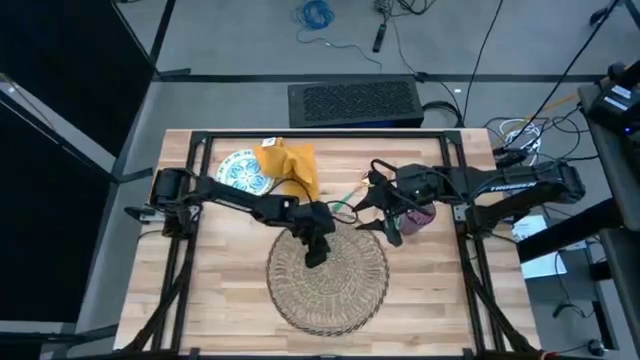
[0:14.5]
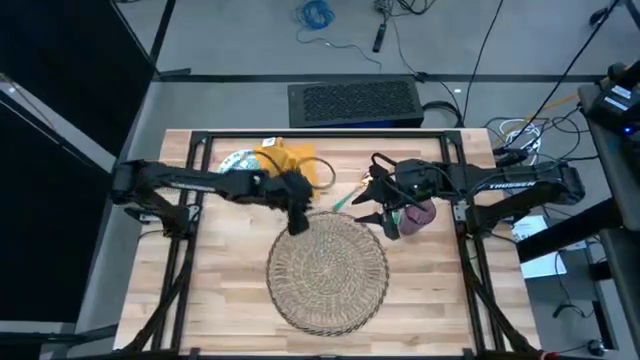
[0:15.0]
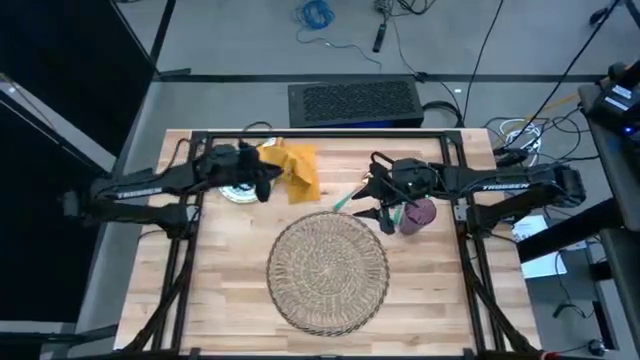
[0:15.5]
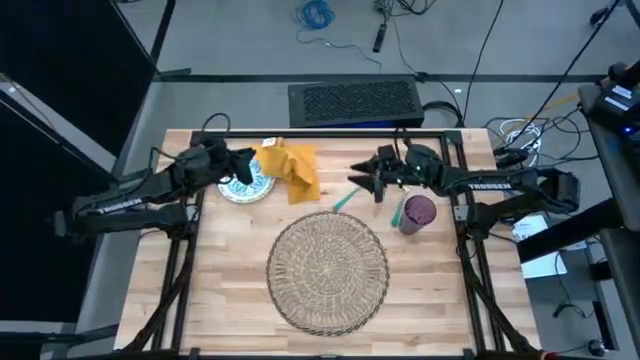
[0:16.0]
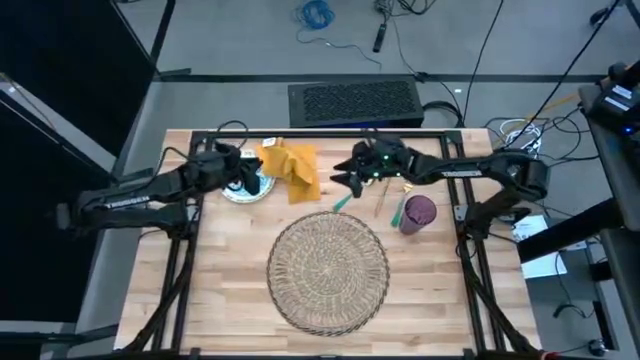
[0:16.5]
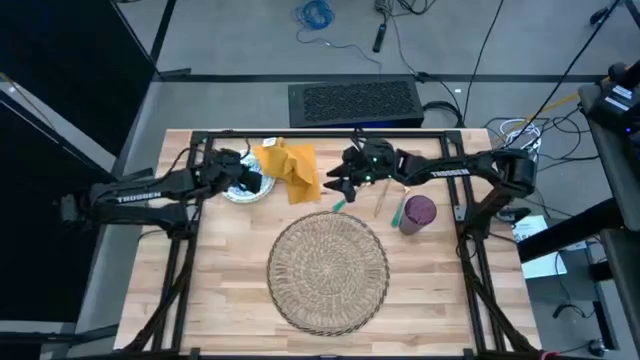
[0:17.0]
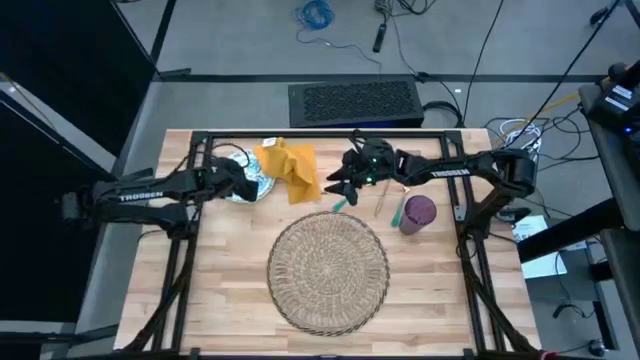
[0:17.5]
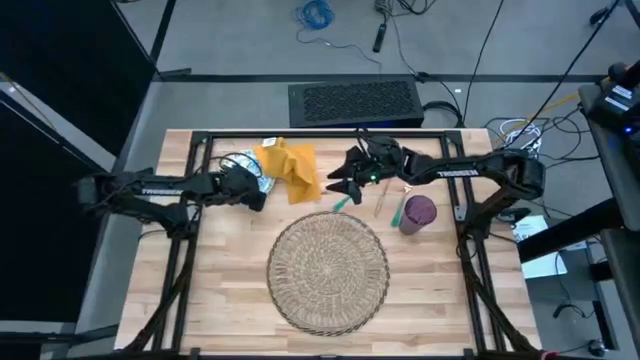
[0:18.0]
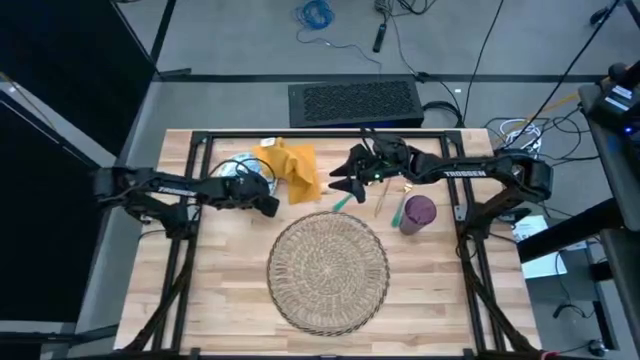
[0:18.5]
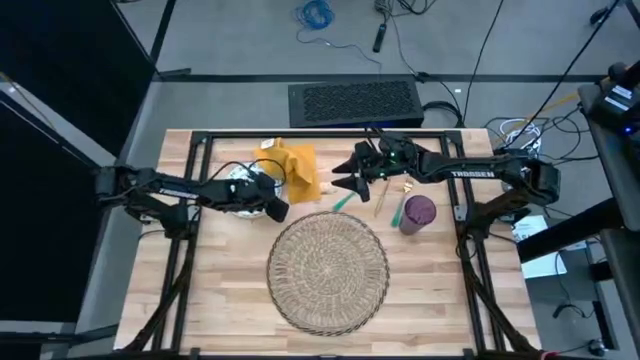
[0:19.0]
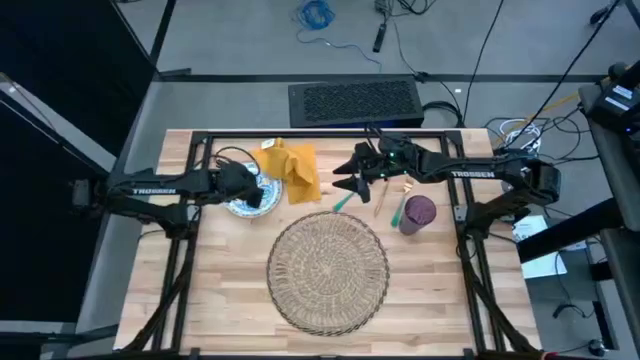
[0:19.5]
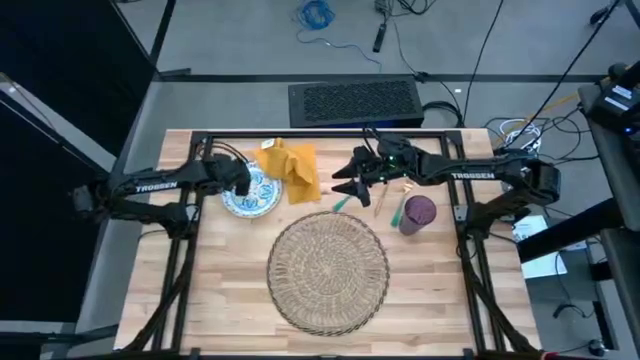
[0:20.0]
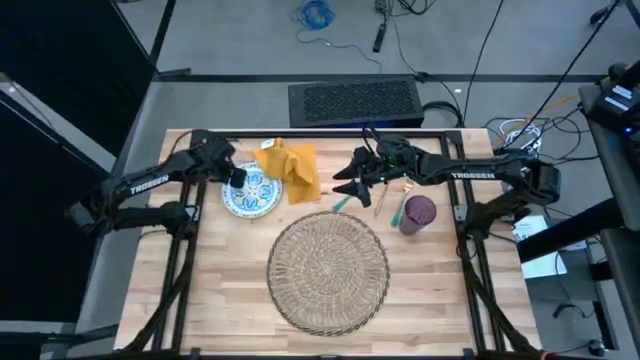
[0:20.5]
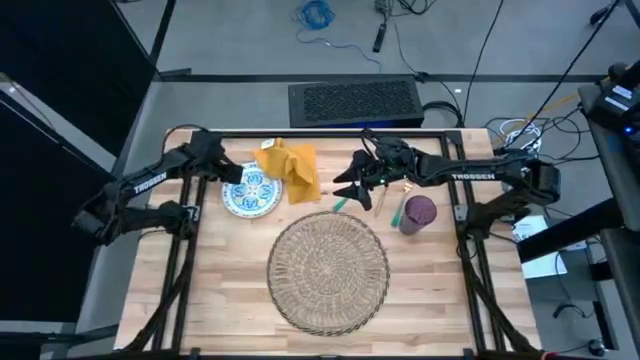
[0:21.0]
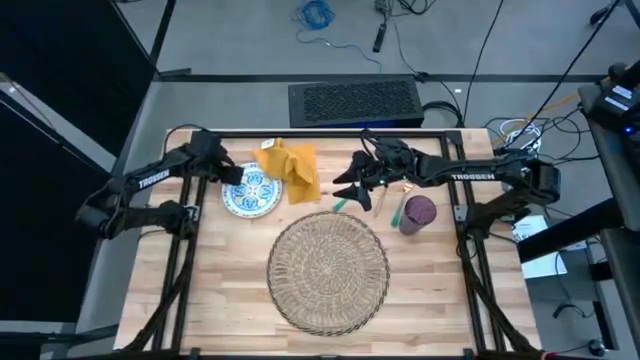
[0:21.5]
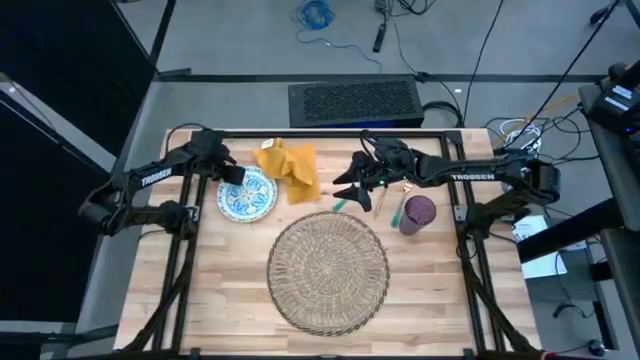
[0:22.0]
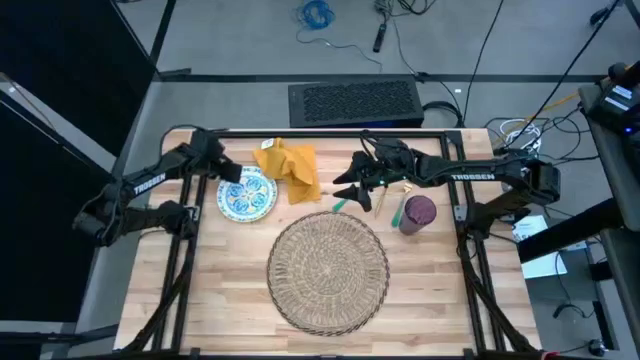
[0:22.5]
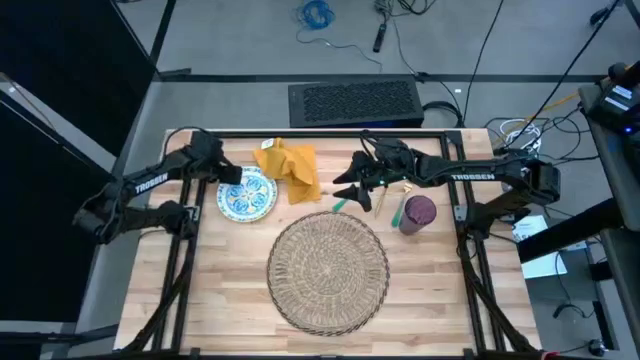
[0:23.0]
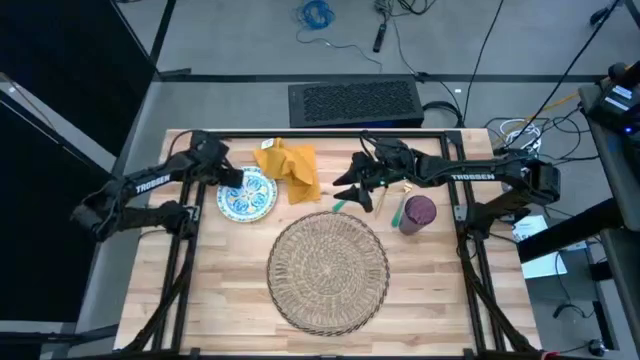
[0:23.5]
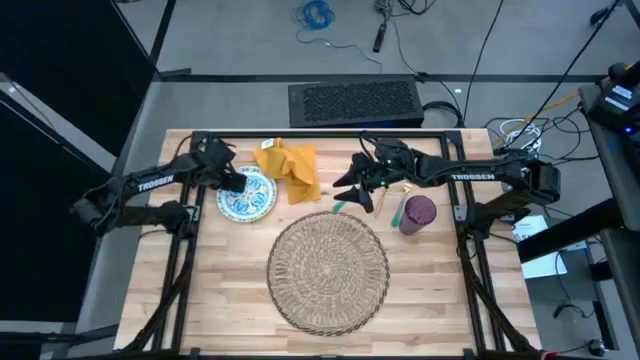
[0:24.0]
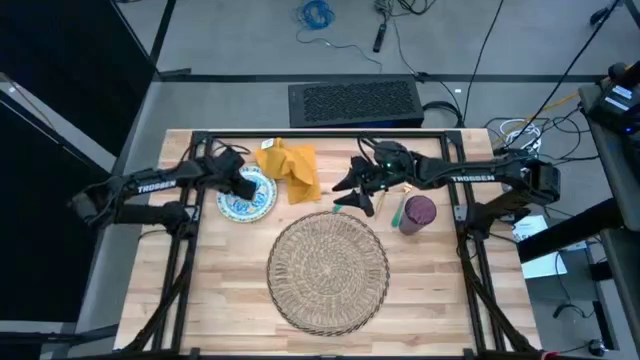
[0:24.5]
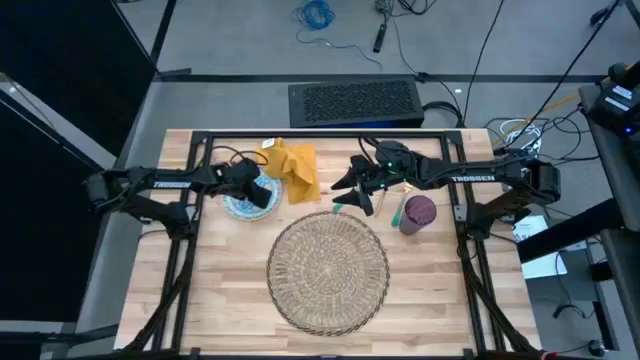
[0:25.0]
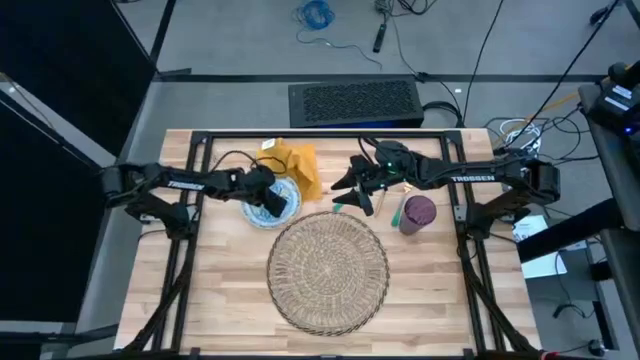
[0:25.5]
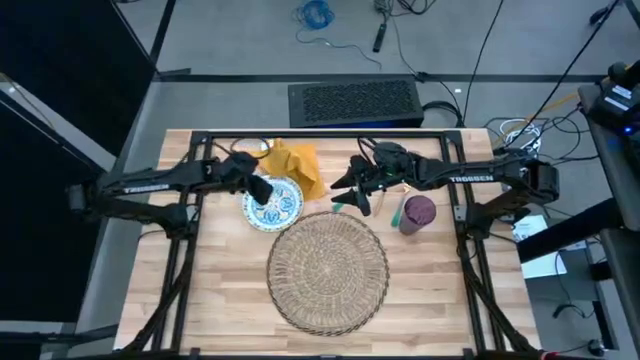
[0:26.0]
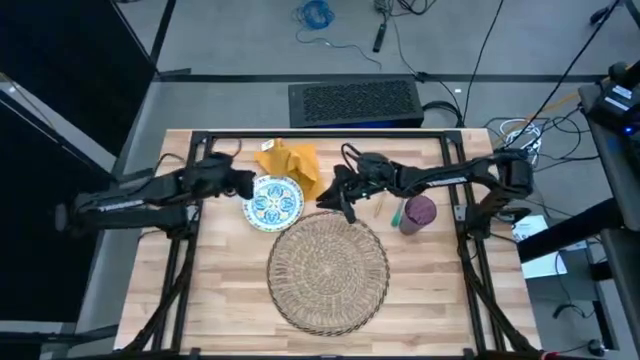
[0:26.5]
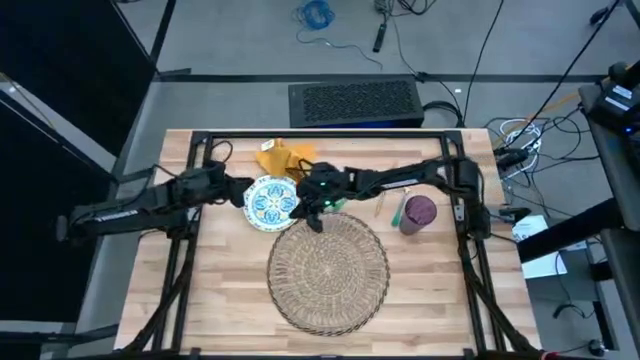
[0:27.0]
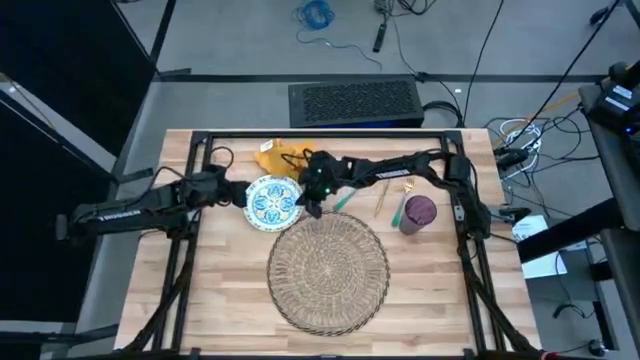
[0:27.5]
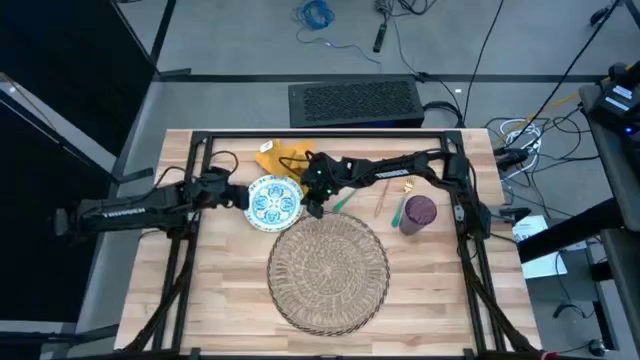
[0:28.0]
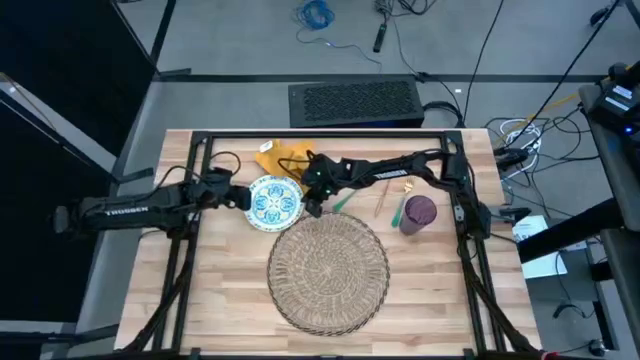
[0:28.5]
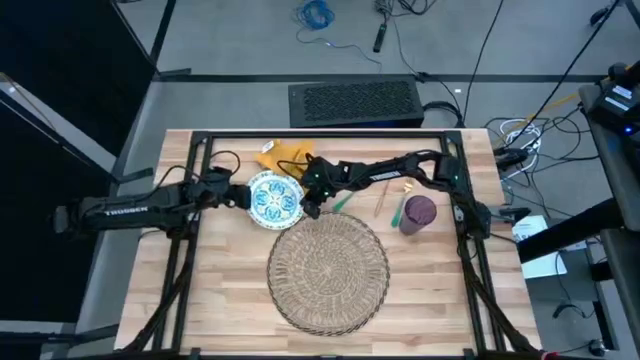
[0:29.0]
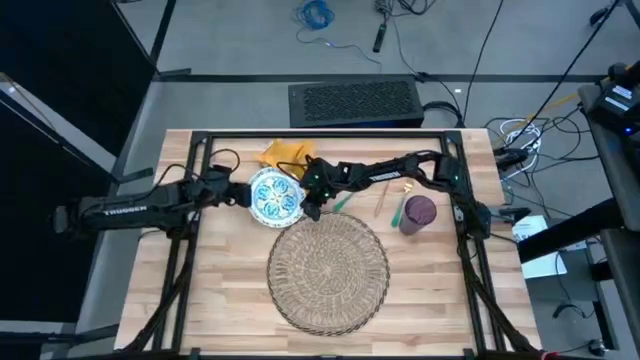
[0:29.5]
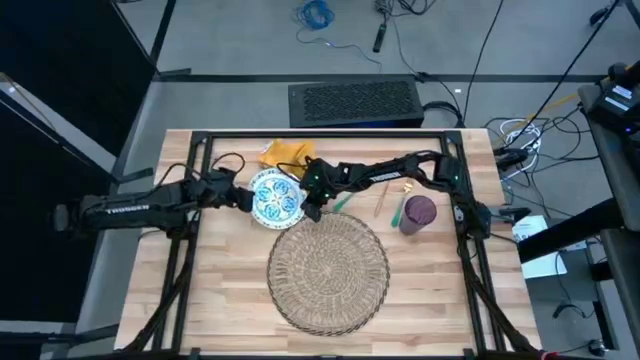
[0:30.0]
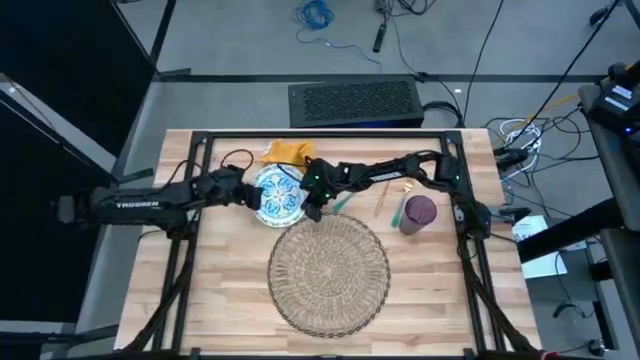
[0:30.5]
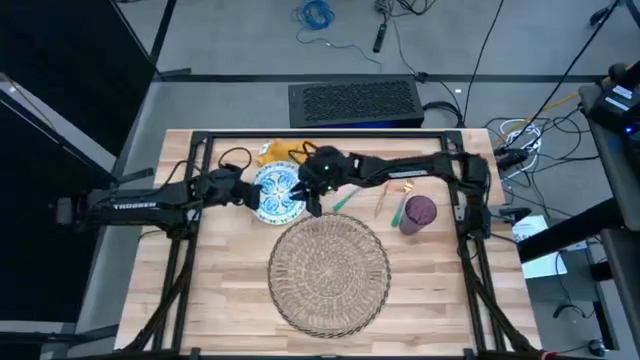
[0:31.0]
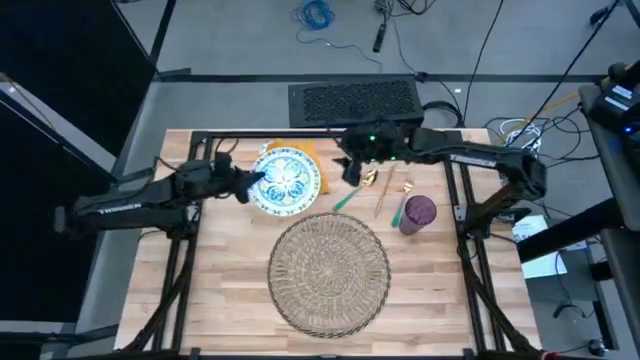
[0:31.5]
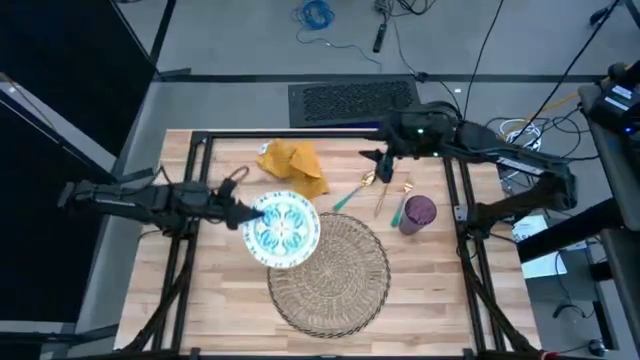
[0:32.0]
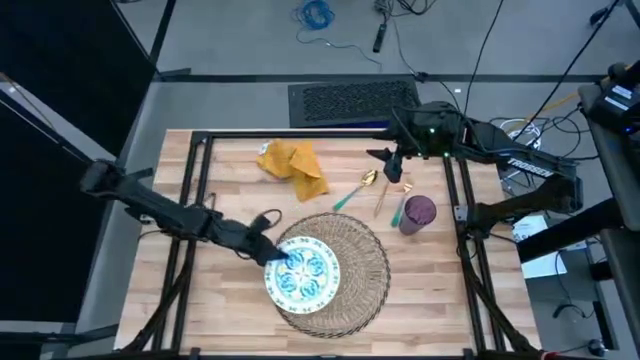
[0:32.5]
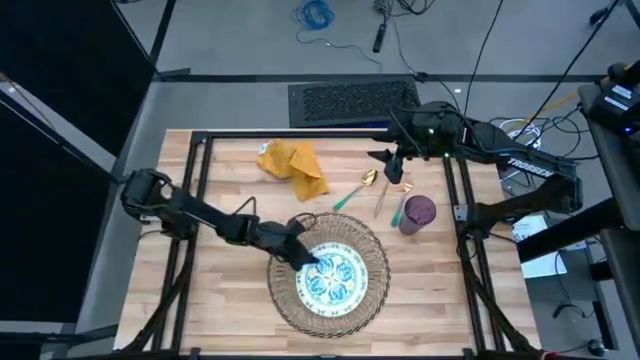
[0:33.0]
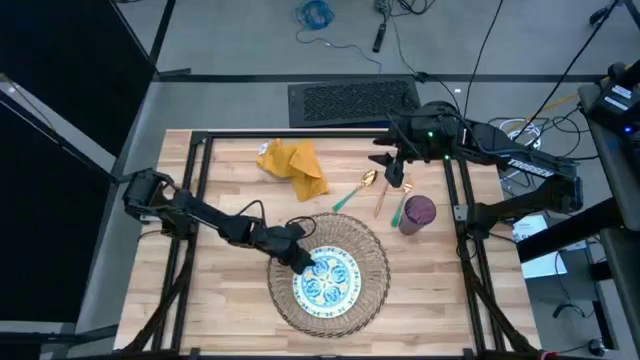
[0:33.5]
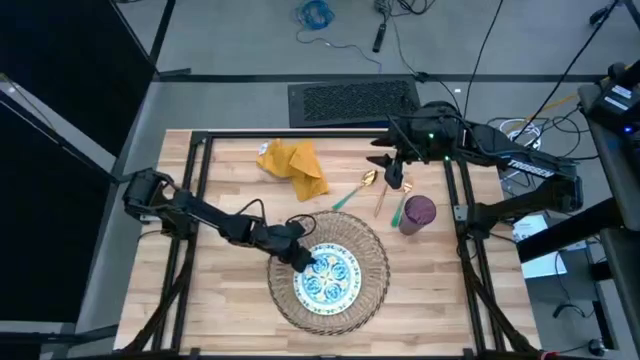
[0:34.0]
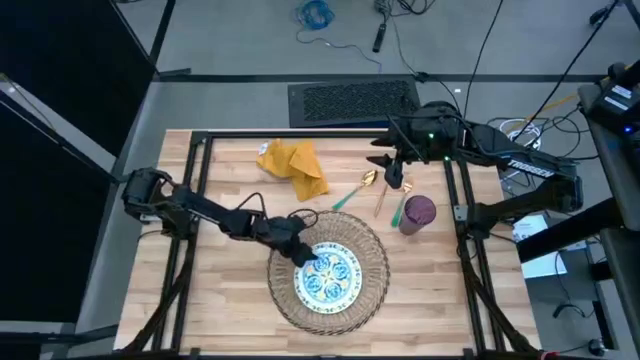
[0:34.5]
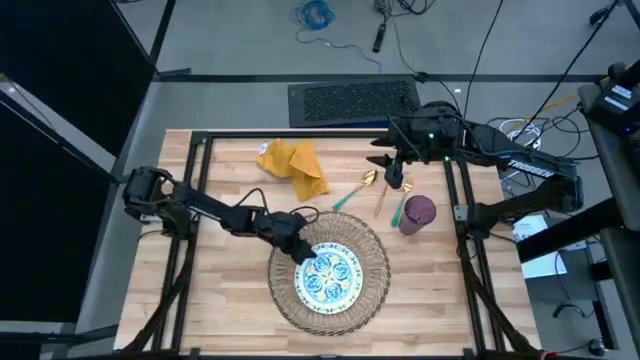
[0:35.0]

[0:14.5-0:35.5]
Task: Set table place
Put the white plate to the center of the brown table mat
